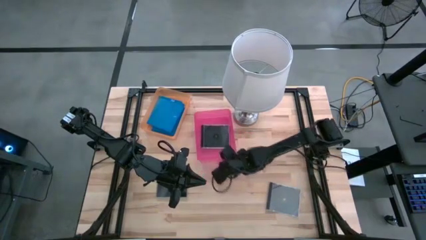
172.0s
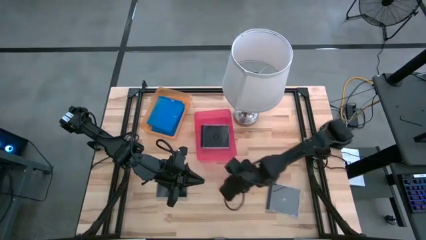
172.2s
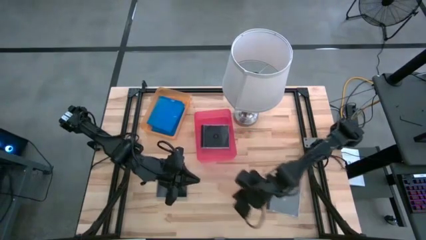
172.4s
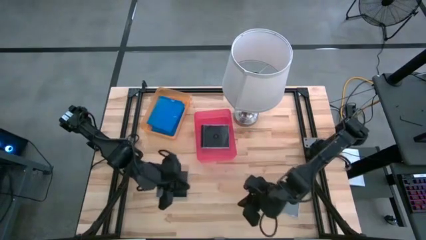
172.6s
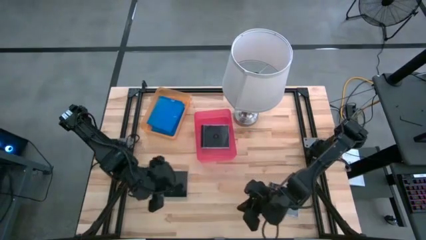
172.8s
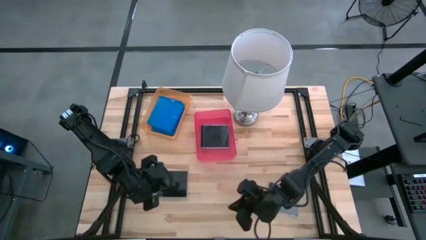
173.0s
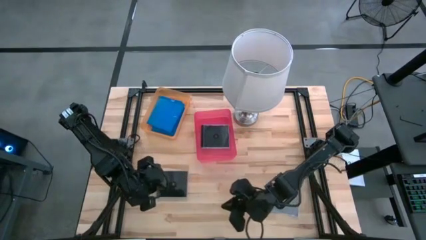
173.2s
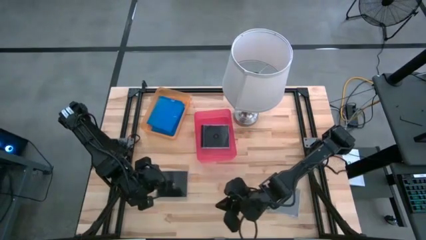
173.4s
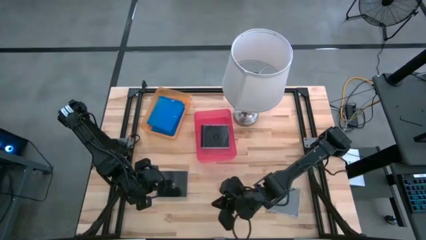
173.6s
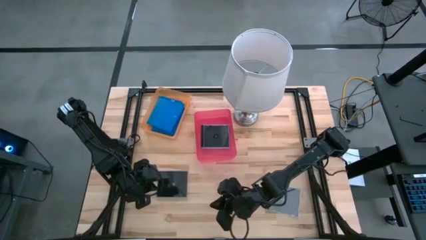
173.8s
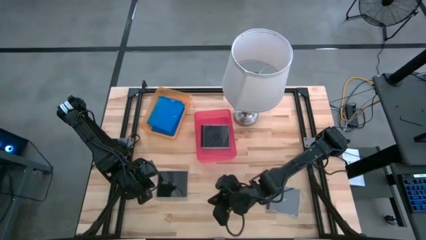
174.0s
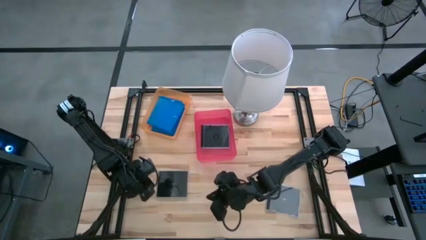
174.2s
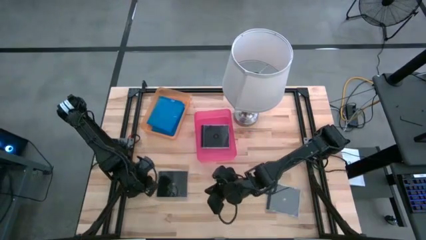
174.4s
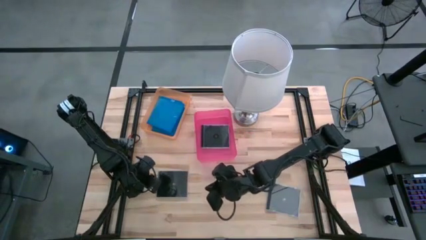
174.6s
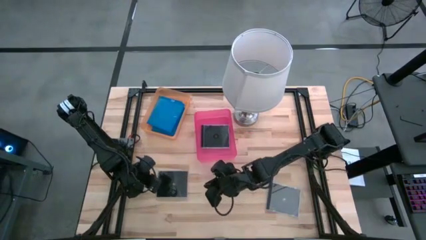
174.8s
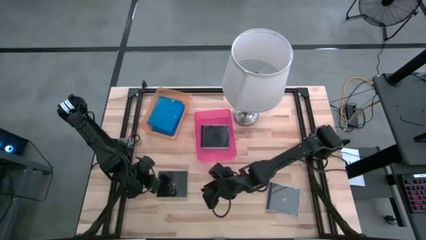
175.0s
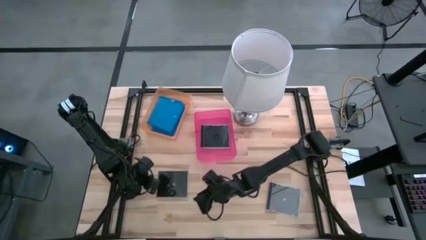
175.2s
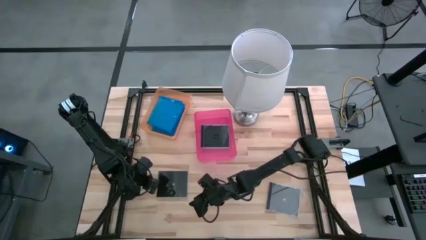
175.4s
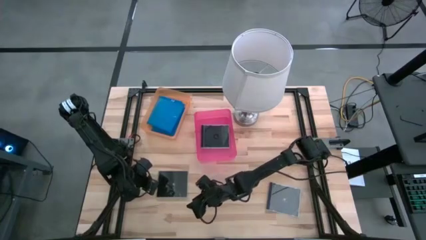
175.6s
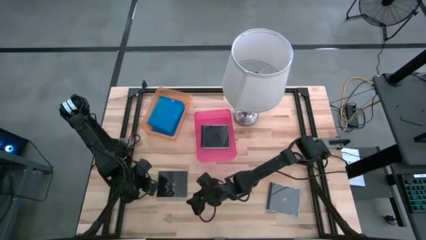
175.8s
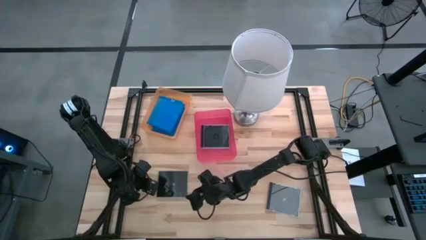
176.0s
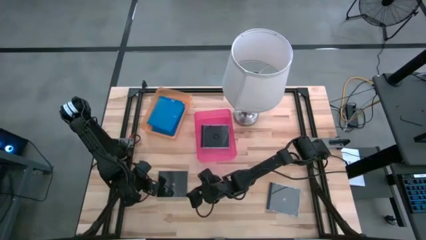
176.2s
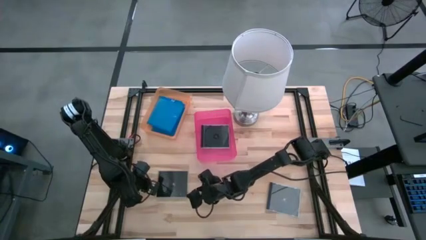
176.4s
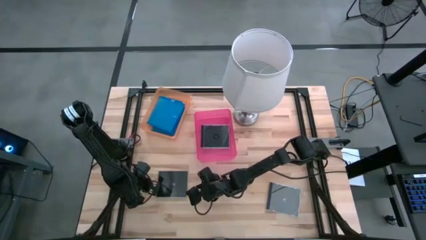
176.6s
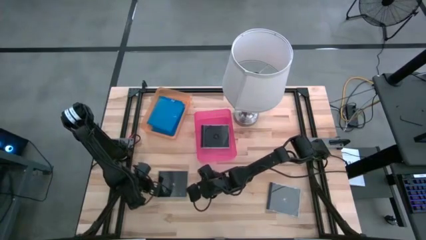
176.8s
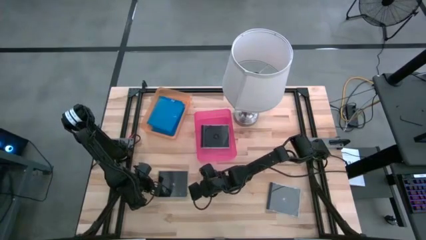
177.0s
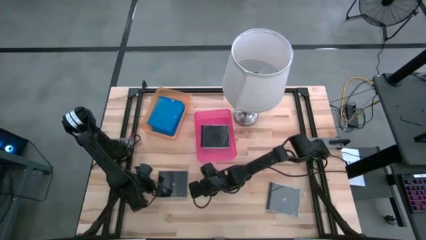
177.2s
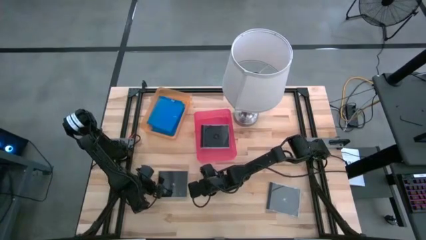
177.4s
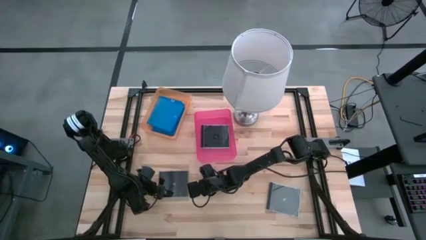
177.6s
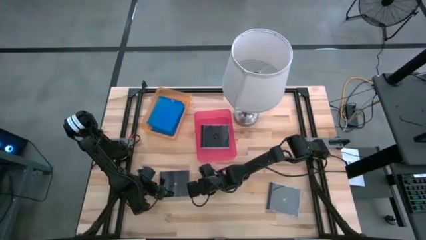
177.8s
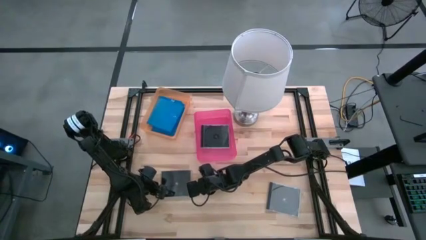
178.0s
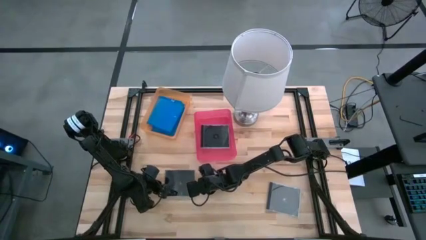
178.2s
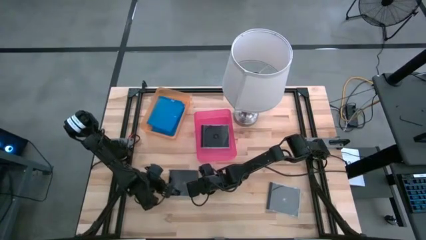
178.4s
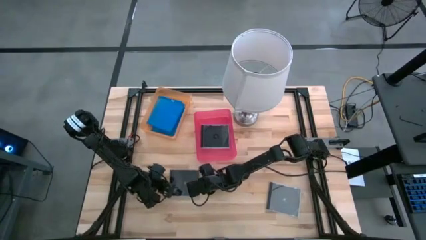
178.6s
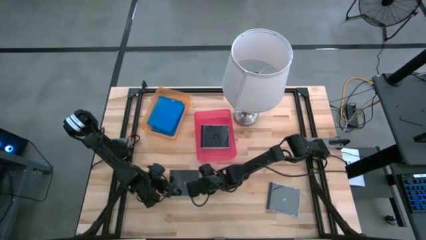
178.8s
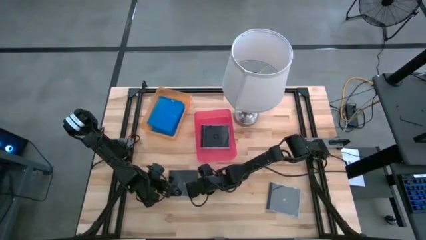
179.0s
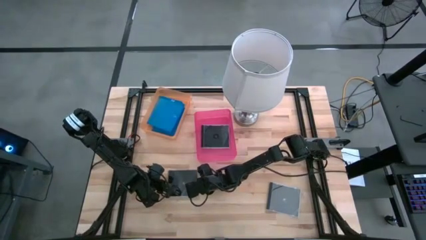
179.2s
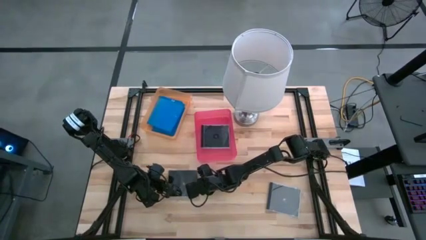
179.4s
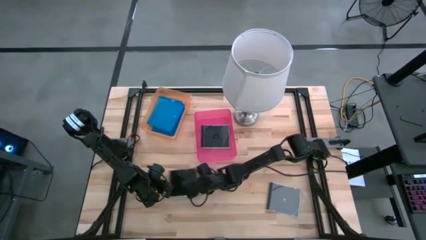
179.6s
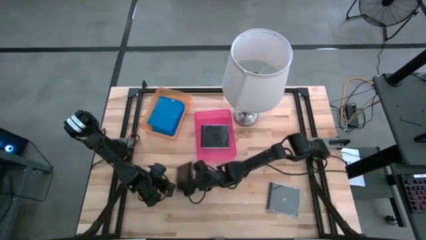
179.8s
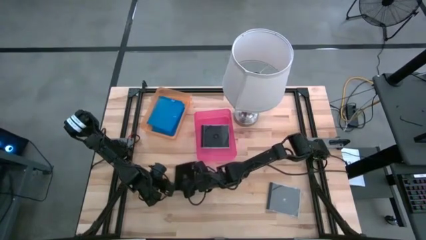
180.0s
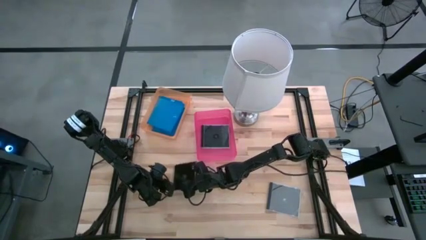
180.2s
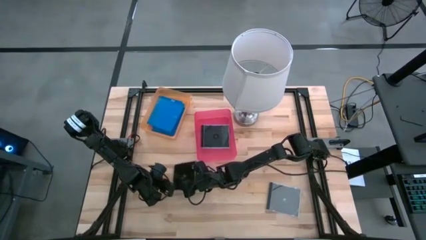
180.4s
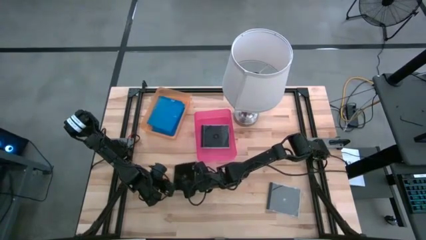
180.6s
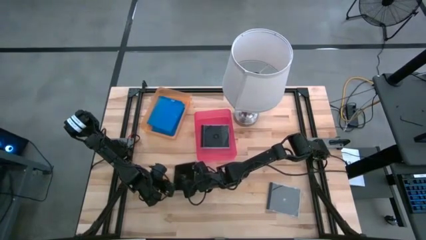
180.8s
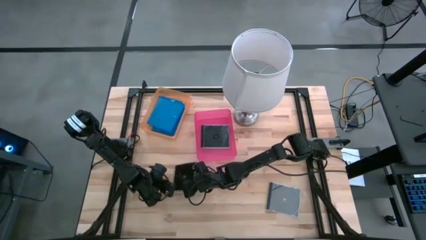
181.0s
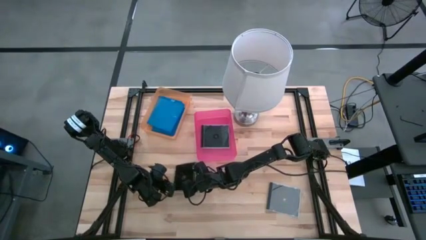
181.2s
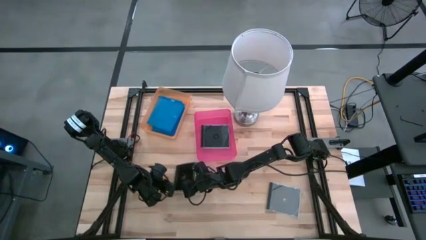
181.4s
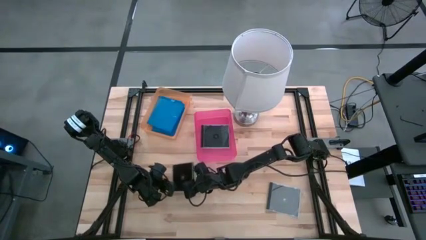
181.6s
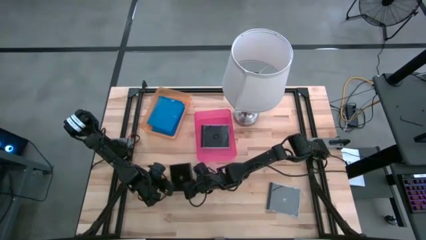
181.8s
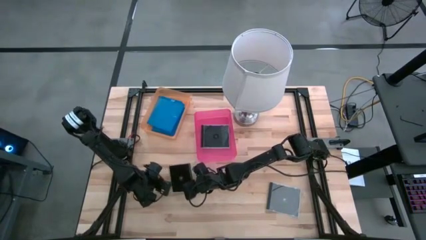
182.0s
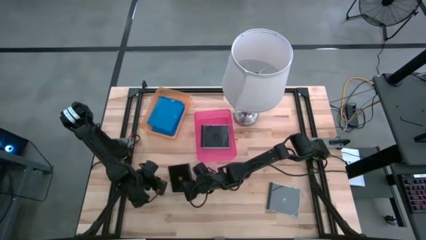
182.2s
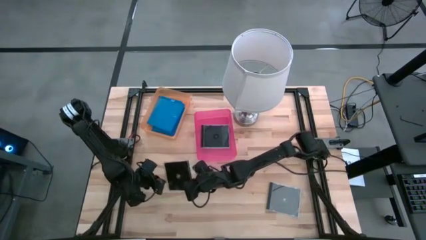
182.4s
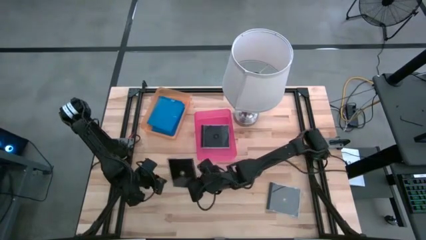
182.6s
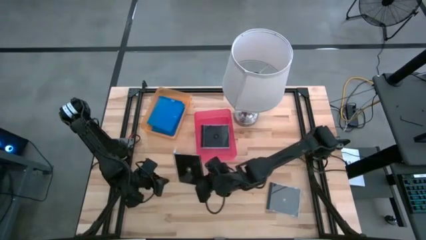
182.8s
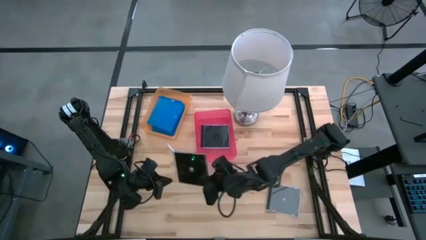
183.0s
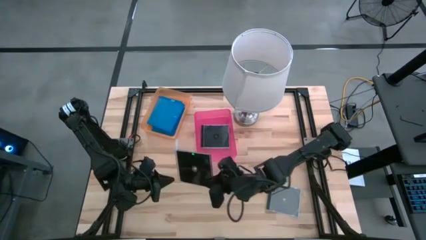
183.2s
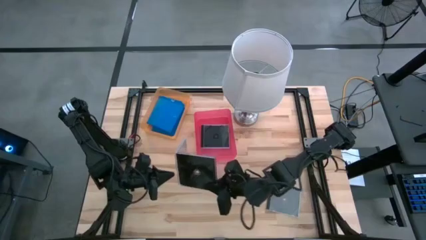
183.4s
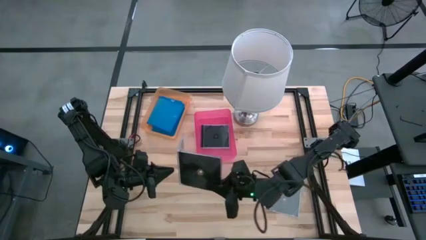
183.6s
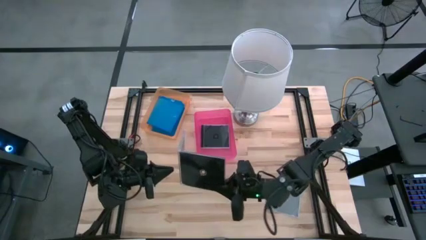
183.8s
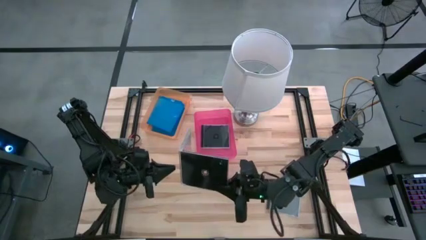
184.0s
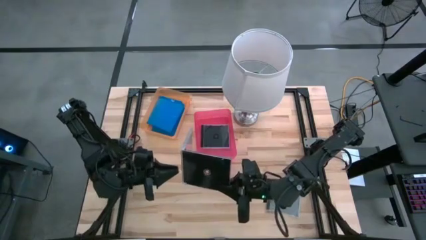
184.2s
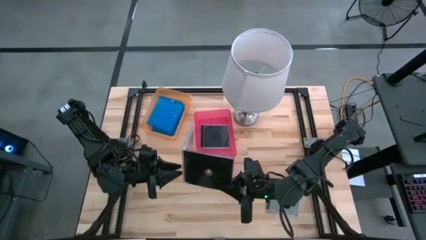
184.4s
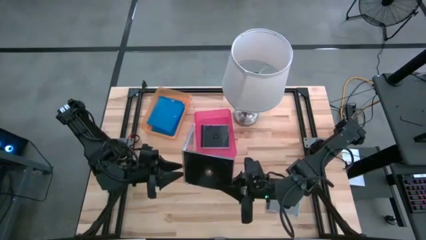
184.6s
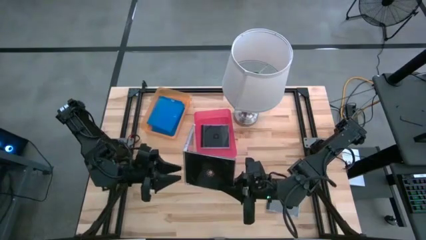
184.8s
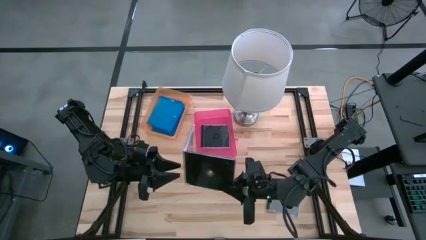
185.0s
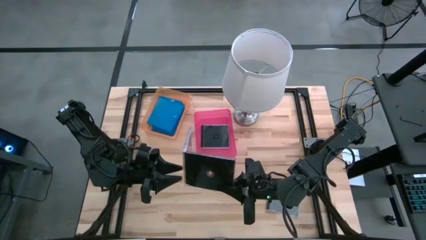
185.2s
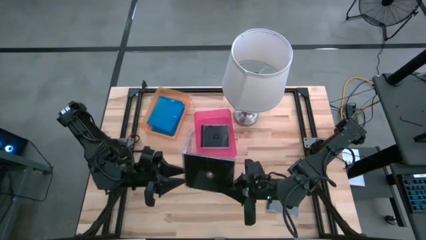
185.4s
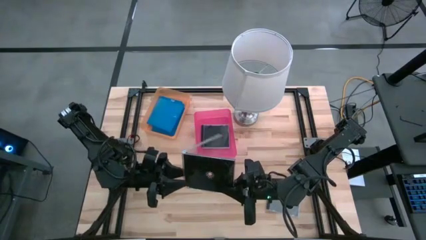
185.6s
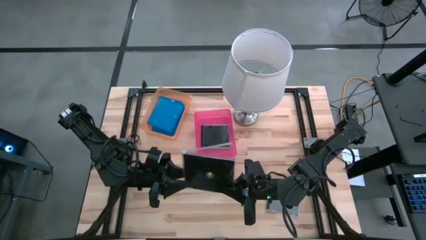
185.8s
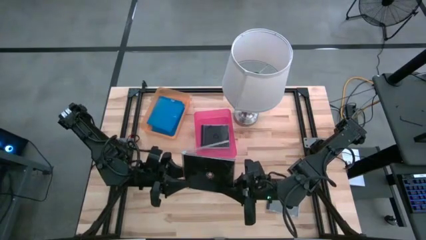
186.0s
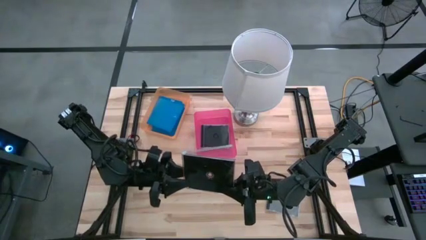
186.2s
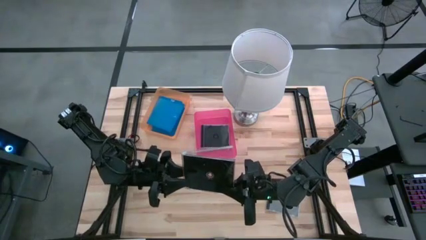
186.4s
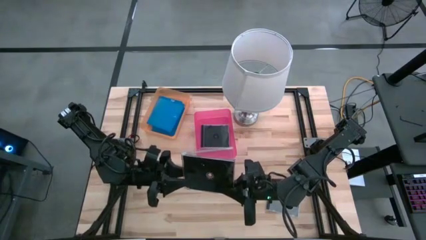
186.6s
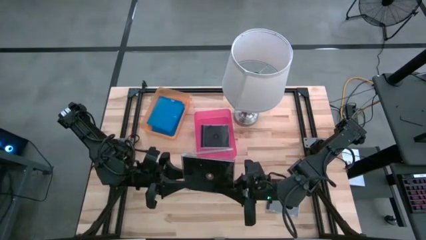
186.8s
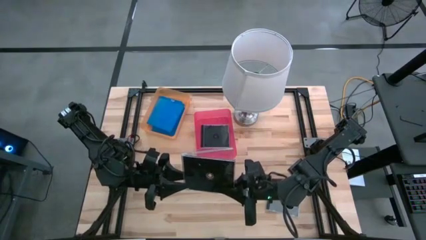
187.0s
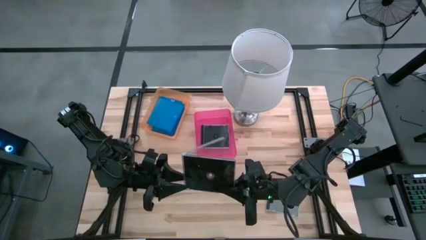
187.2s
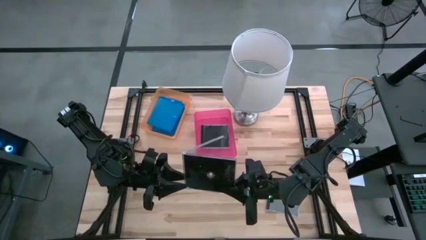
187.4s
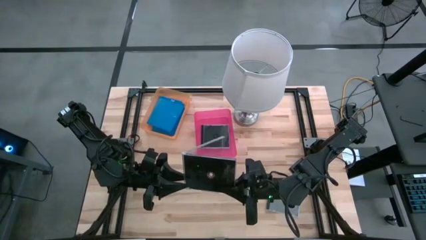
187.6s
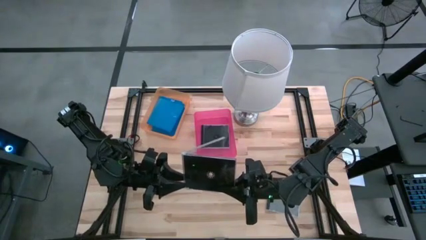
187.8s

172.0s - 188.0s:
Task: Pick & place jewel cases by type
Put the left black cd case into the pink bin
